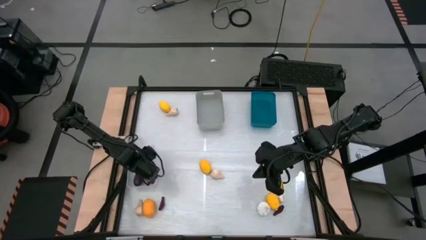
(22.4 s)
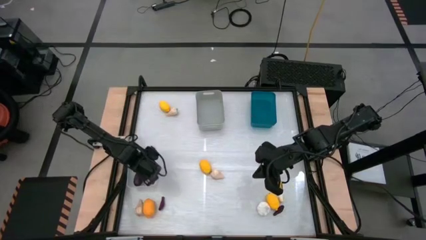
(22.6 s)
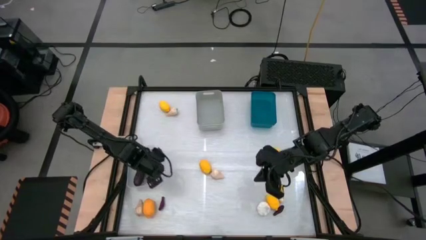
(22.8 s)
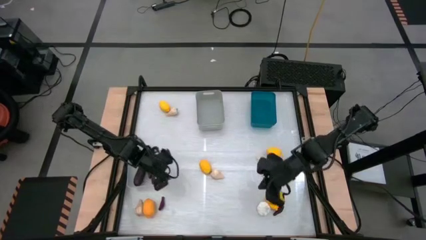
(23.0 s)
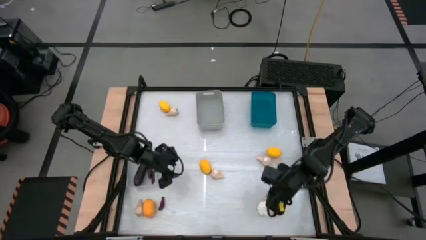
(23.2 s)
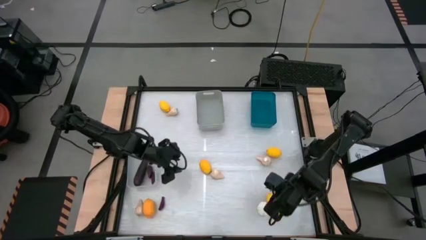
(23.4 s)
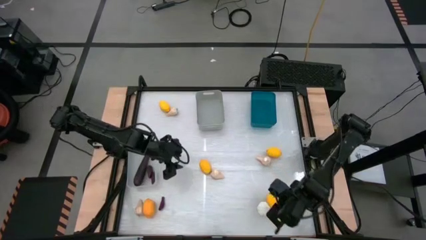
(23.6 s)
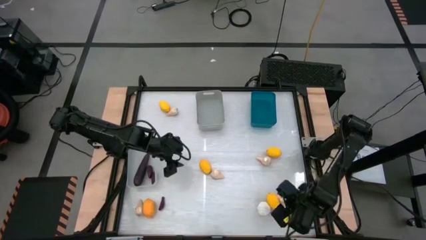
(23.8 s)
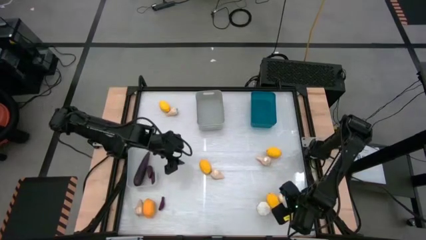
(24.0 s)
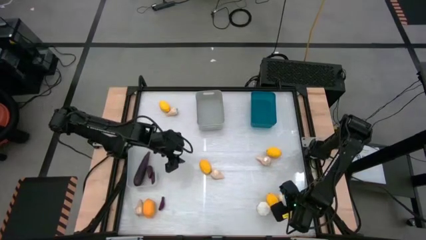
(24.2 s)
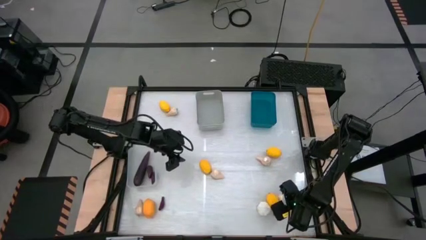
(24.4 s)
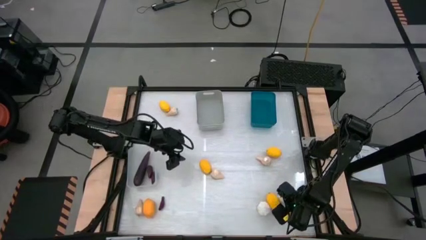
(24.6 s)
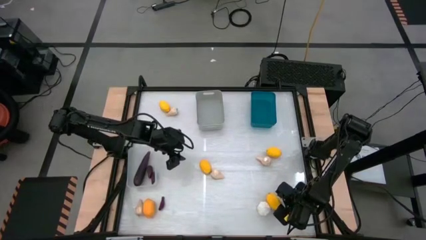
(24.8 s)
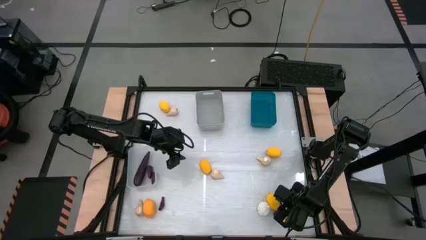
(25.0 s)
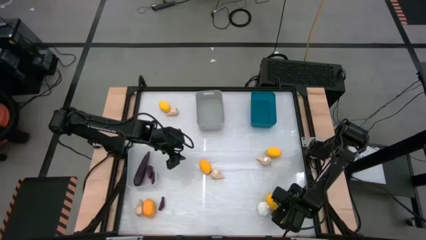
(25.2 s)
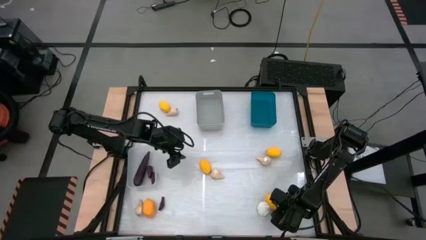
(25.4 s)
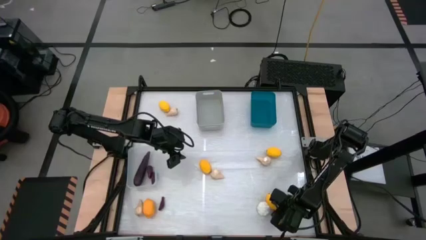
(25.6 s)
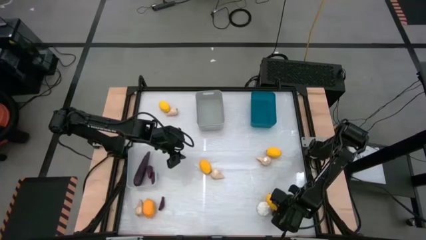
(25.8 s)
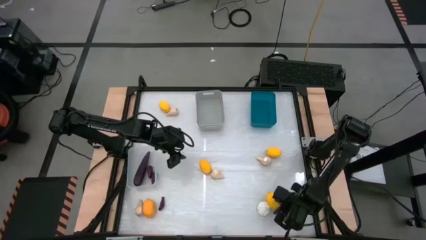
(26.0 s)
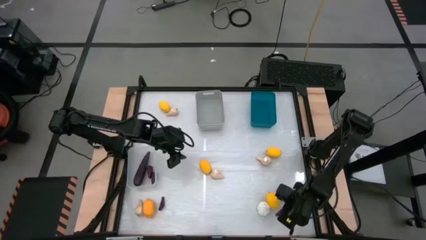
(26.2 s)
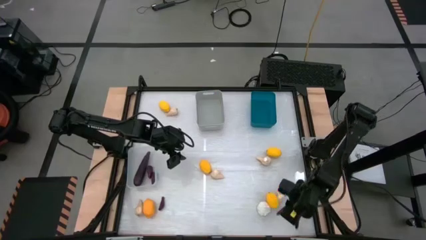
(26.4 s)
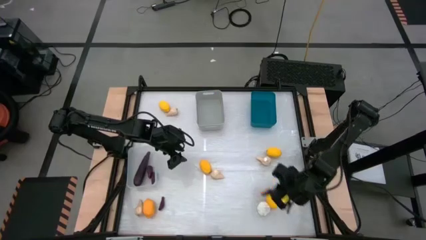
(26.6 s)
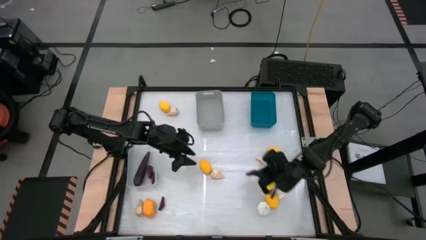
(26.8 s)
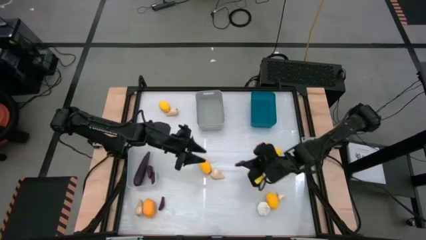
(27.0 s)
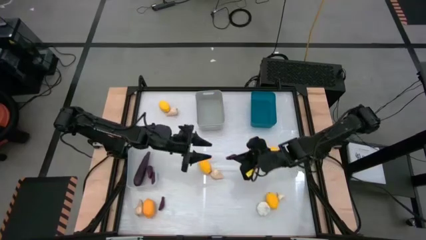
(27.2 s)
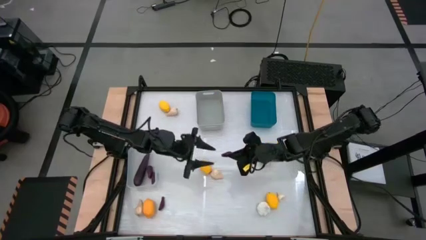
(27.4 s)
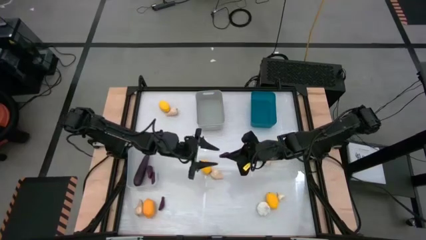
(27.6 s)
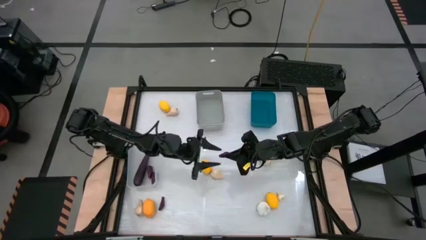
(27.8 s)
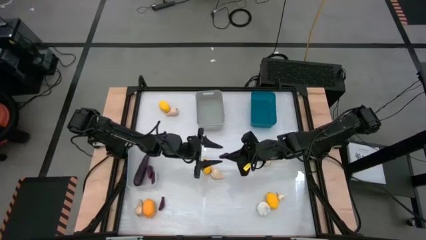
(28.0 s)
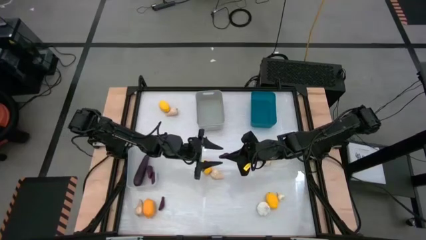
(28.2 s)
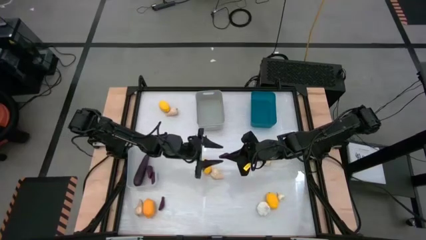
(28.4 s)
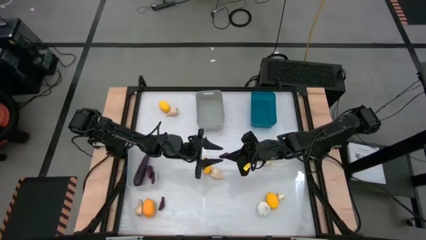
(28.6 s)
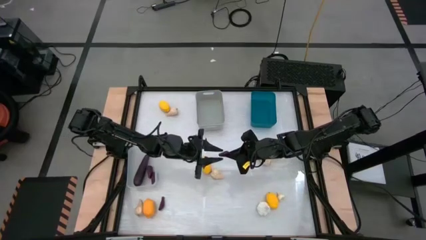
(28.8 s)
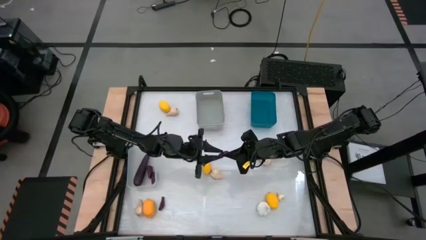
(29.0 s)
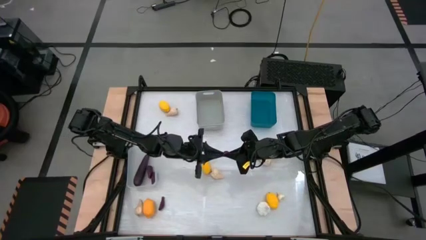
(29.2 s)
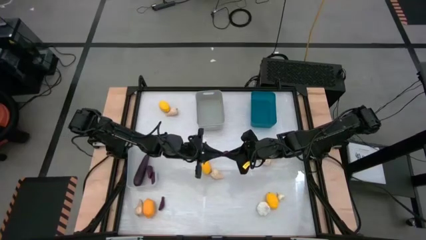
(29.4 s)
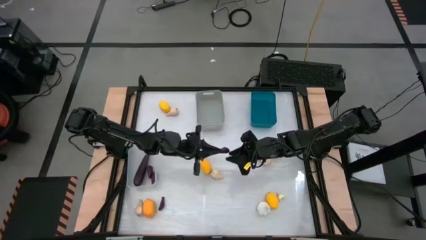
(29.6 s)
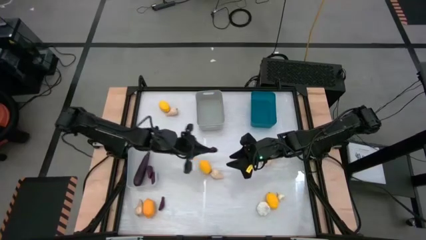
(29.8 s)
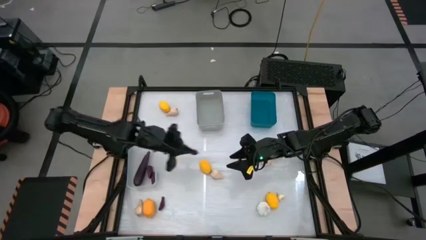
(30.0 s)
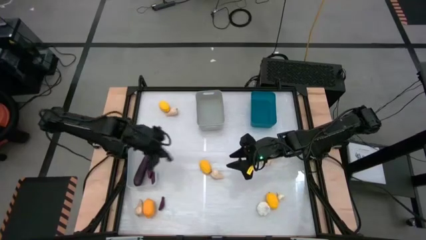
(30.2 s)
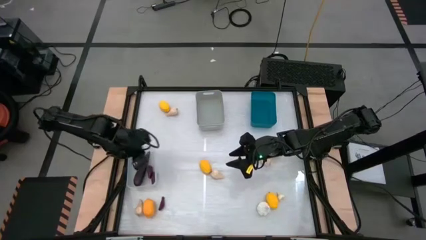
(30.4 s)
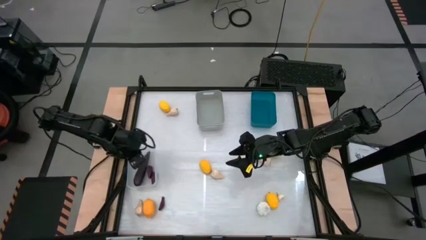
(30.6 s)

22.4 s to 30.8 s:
Task: Sort produce into baskets
Put the purple eggplant into the transparent bin

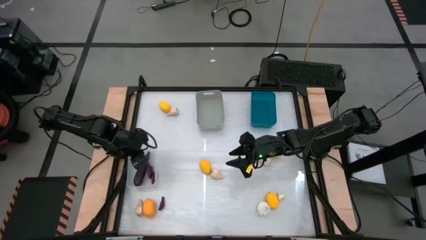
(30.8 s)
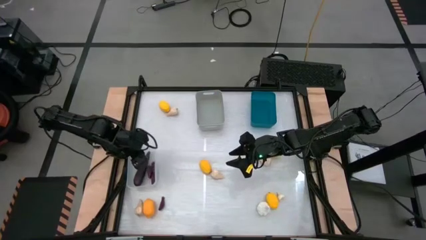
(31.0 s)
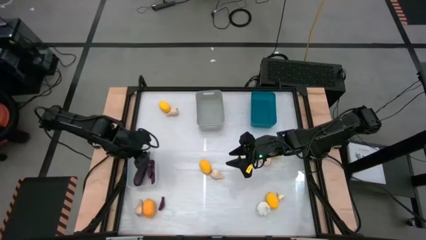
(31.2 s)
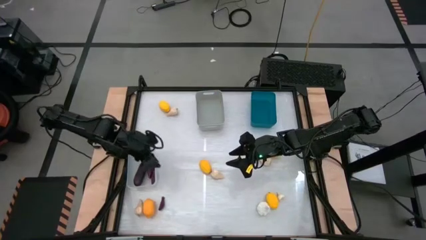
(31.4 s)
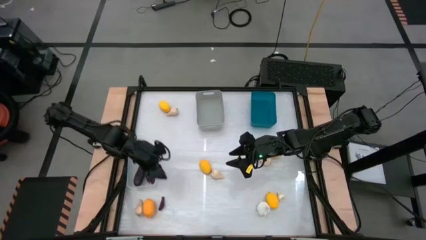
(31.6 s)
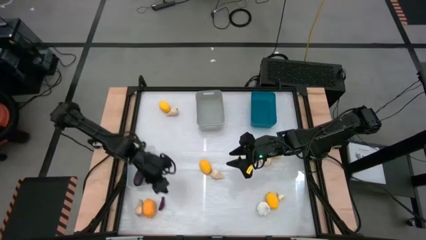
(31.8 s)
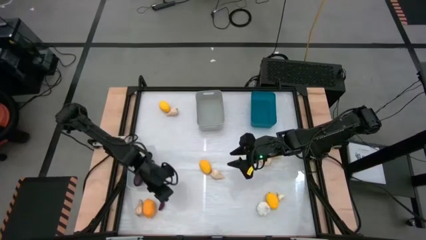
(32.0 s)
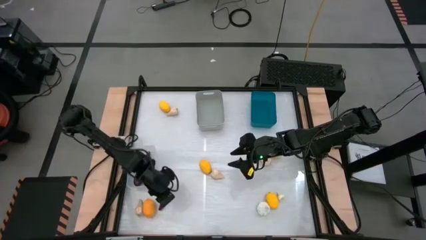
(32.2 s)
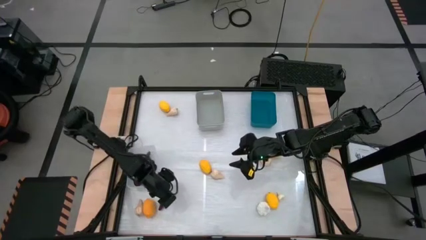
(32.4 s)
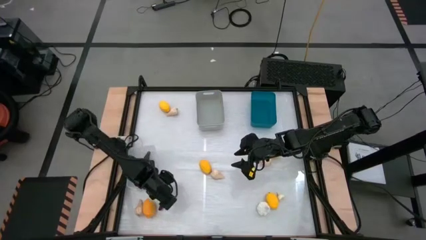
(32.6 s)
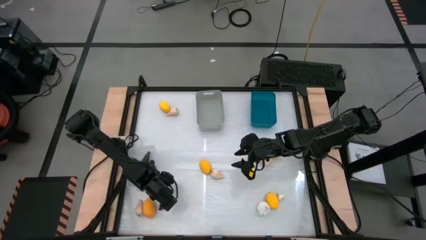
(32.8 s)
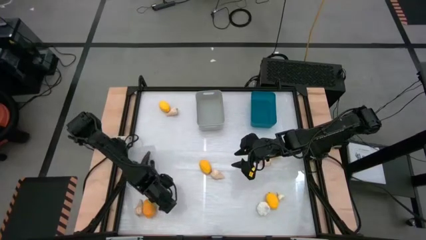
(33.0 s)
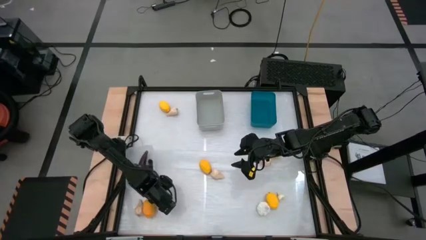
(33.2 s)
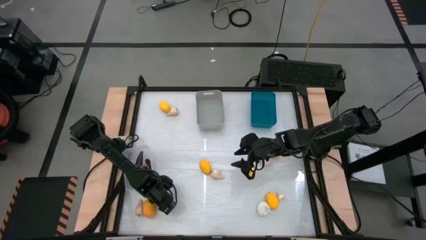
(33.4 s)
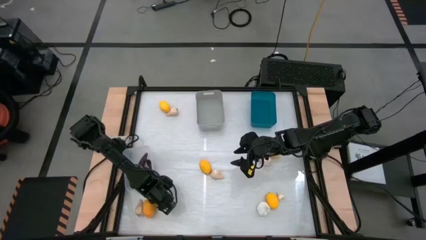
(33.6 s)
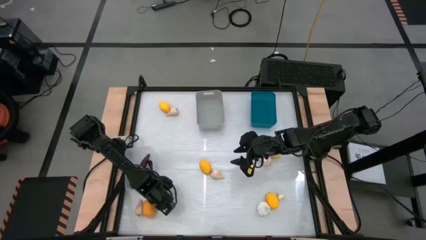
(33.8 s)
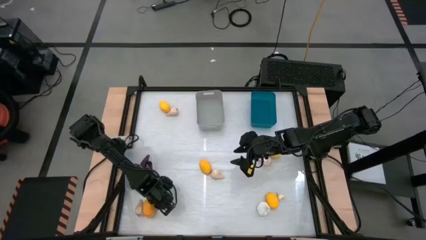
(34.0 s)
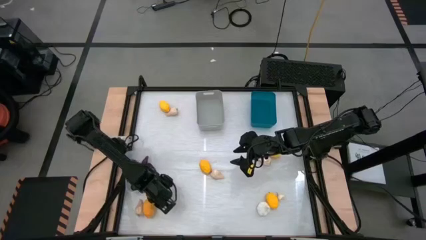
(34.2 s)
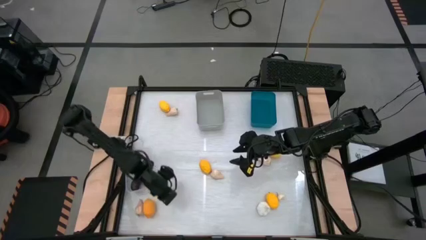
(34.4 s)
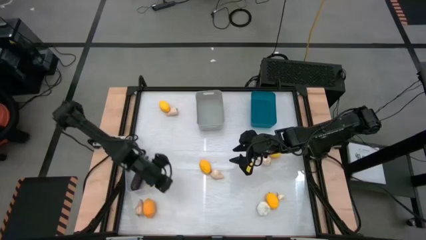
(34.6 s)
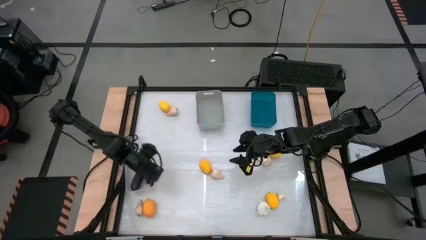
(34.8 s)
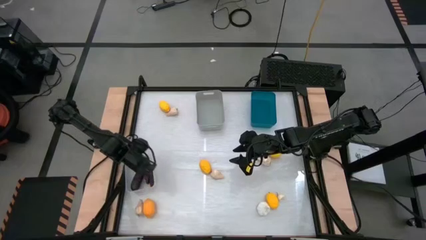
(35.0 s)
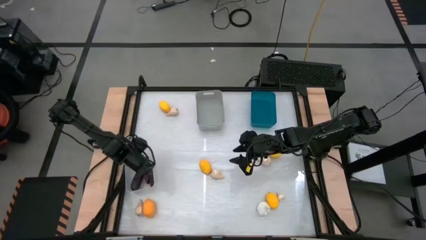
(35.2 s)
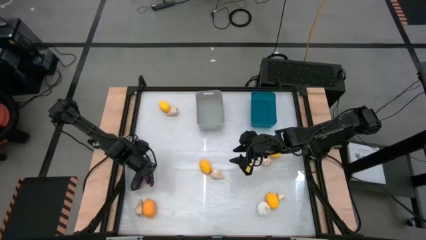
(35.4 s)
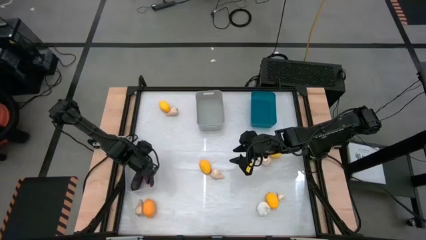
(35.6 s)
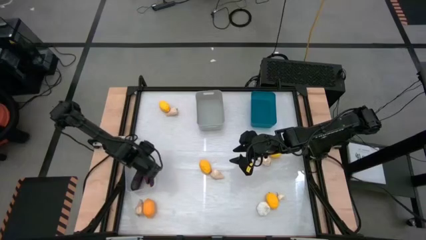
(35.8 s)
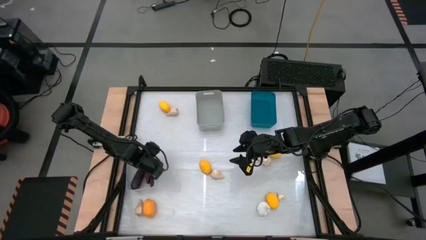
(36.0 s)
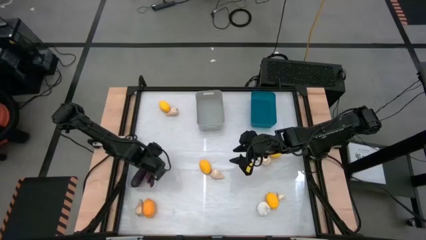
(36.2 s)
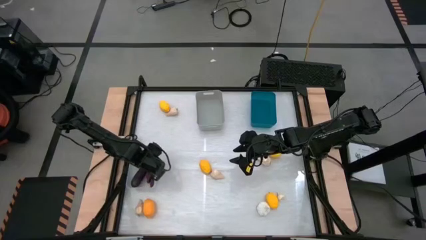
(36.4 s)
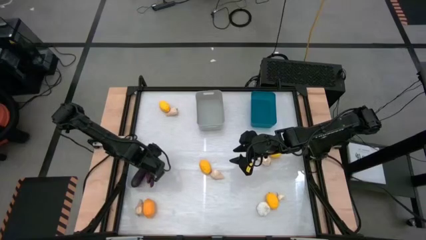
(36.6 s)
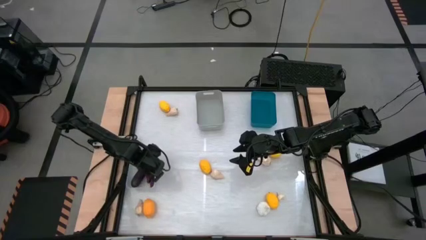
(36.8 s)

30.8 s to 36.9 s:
Put the purple eggplant into the transparent bin

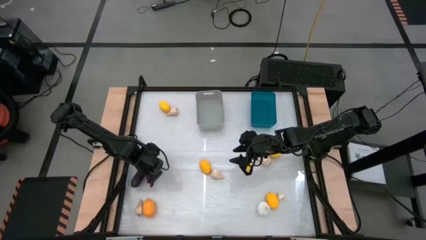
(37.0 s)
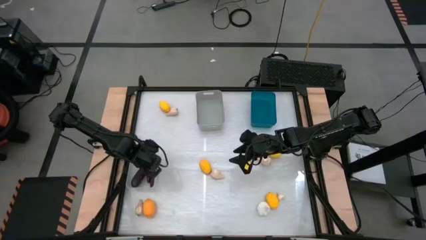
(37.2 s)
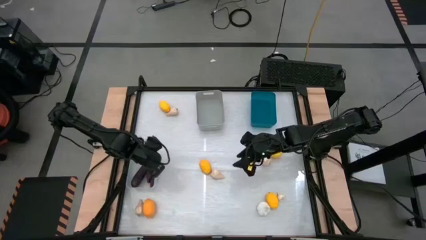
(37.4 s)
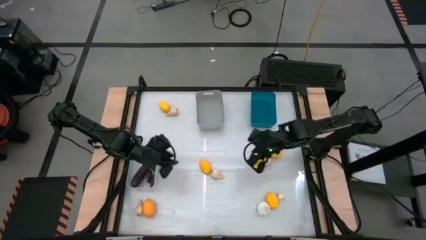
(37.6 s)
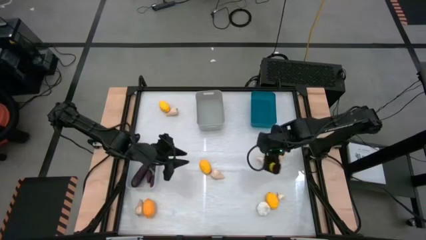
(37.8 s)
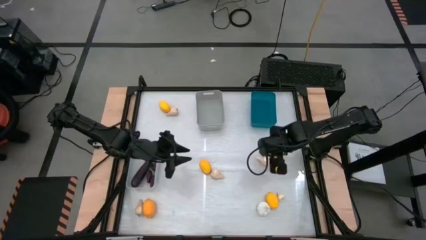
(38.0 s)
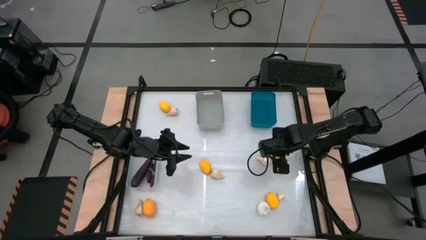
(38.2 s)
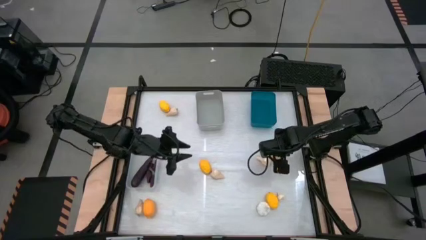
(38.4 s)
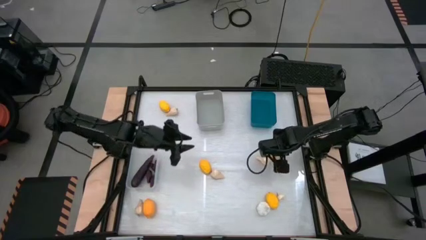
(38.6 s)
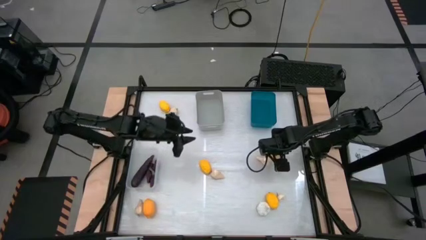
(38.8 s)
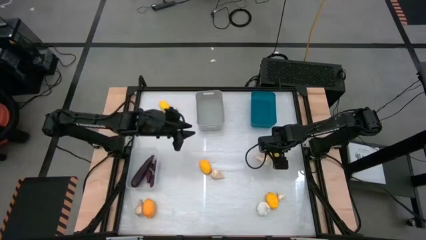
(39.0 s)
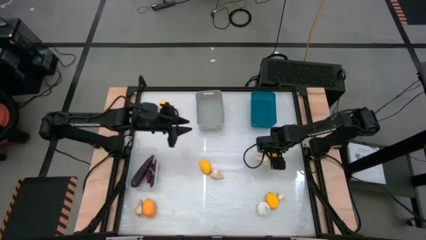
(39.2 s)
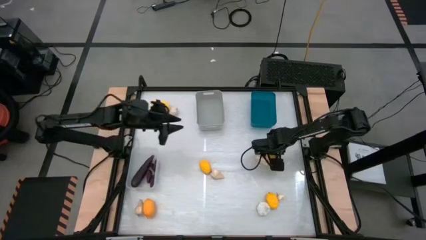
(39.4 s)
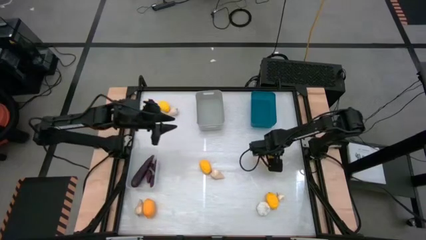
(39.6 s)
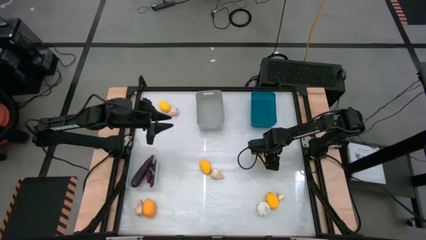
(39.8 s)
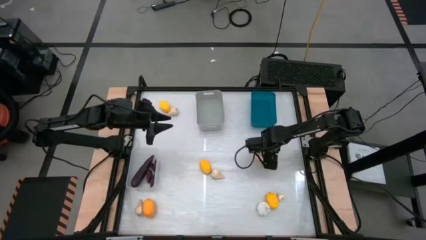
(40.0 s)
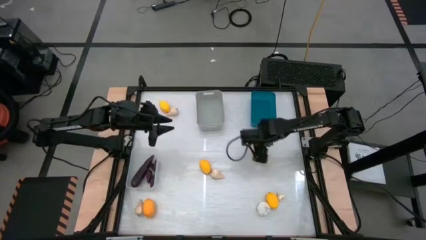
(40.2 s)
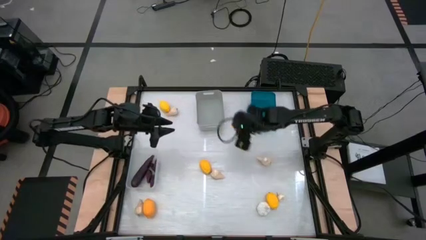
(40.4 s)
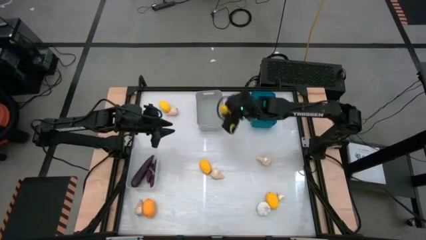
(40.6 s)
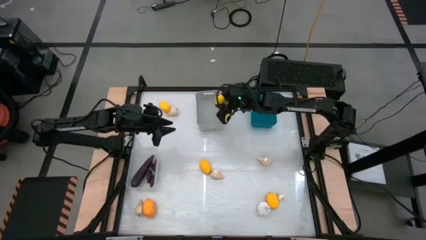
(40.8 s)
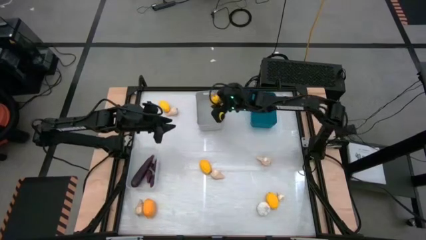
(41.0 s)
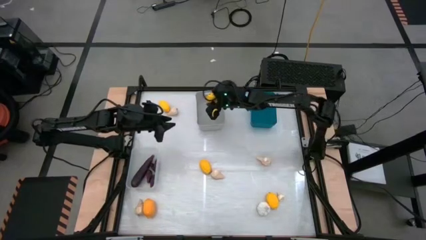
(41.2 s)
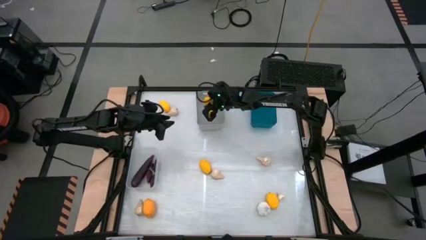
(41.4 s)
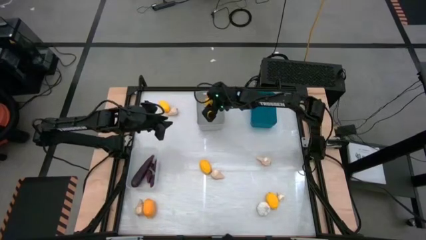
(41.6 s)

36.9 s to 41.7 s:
Put the yellow lemon into the gray bin
